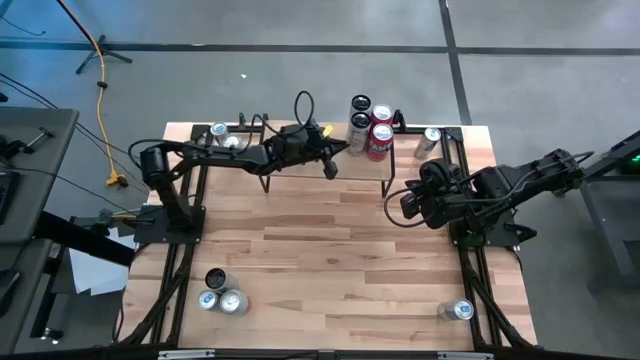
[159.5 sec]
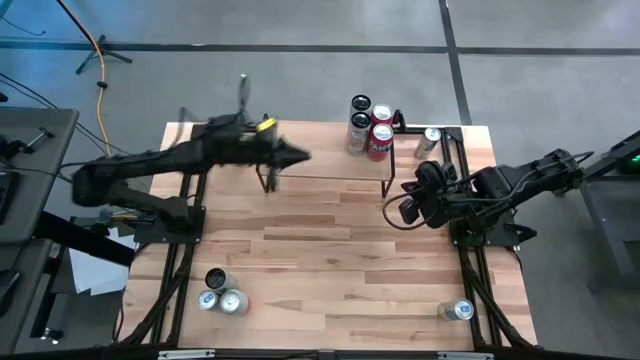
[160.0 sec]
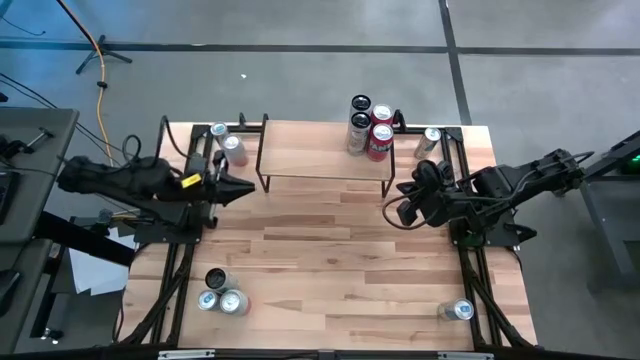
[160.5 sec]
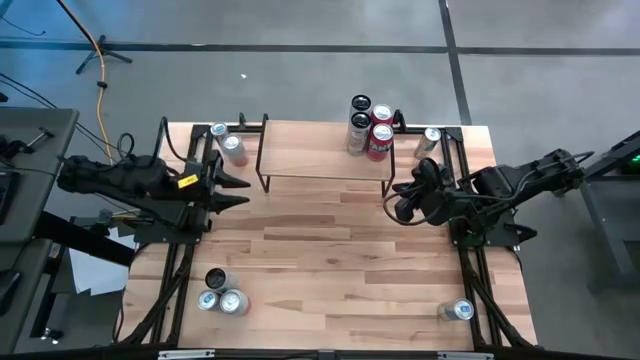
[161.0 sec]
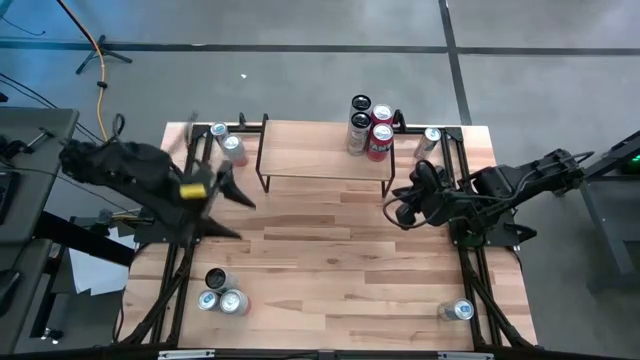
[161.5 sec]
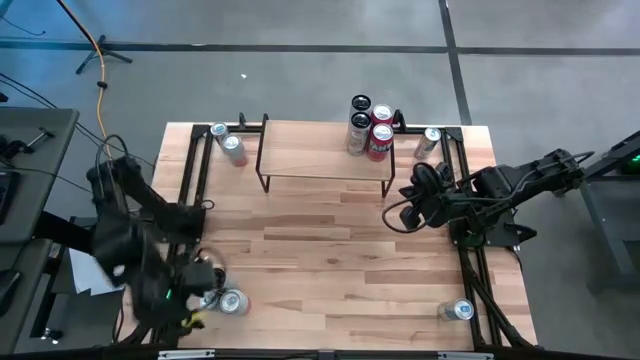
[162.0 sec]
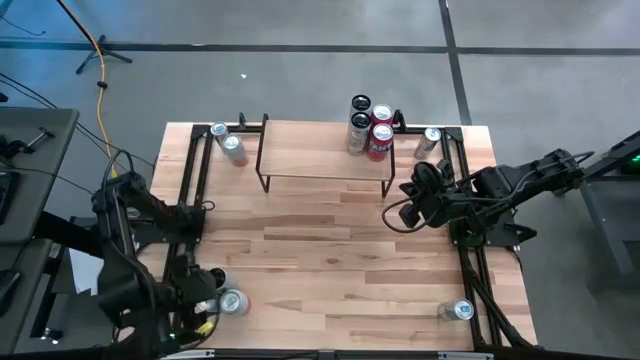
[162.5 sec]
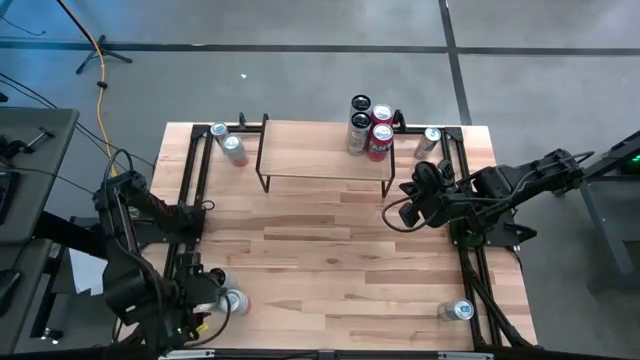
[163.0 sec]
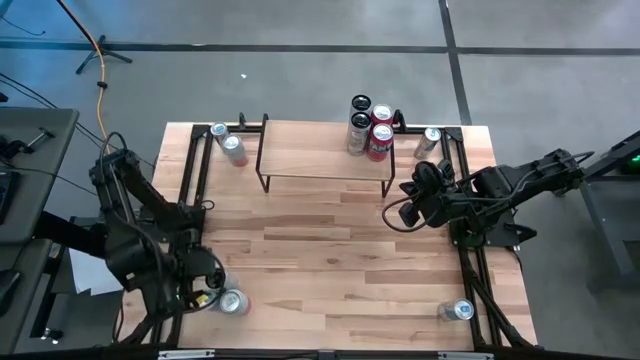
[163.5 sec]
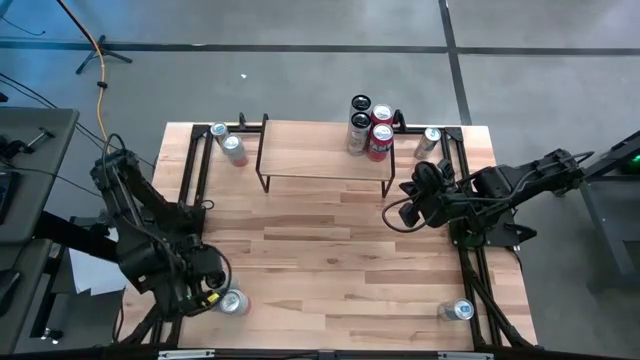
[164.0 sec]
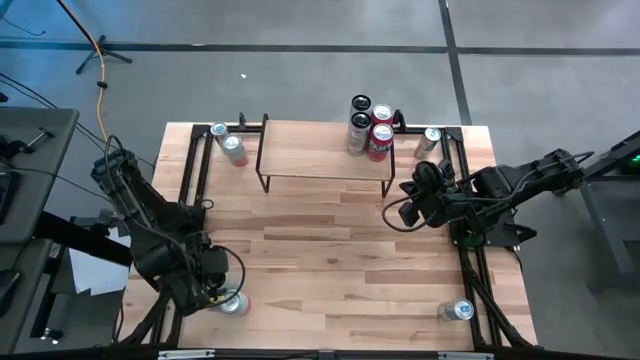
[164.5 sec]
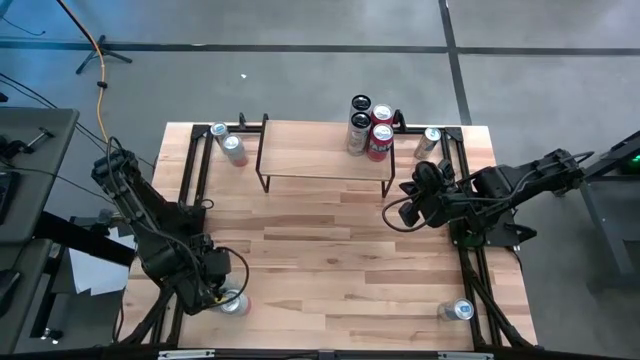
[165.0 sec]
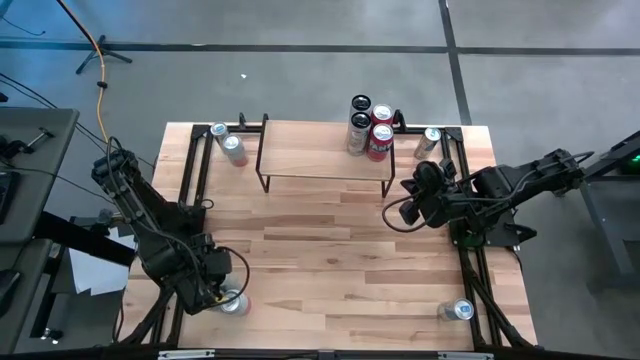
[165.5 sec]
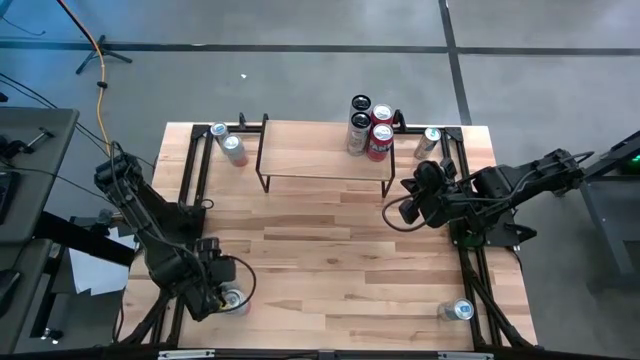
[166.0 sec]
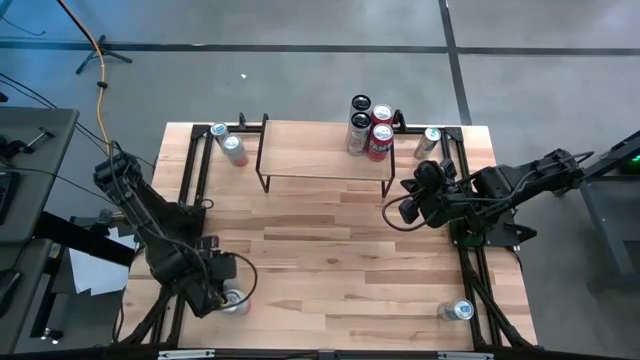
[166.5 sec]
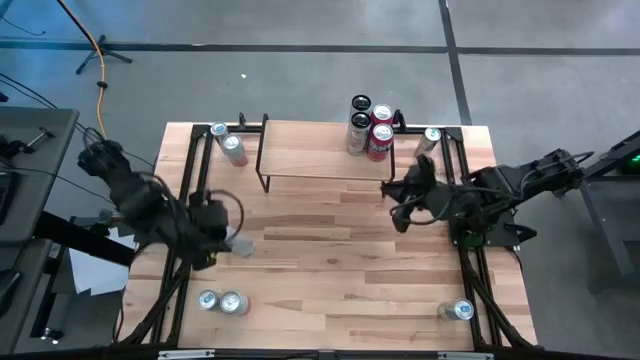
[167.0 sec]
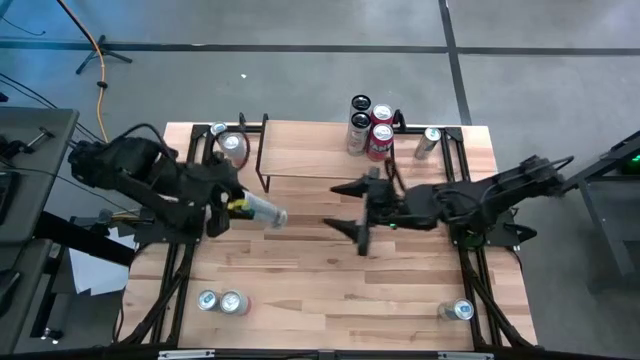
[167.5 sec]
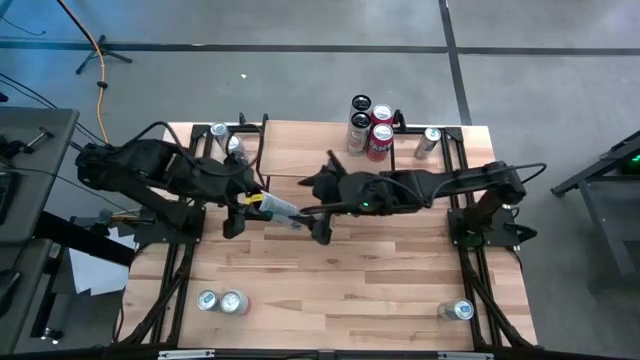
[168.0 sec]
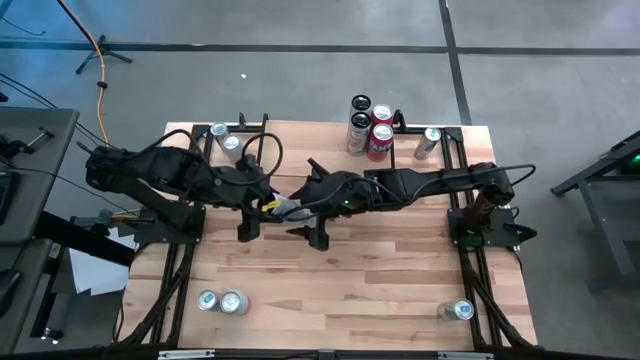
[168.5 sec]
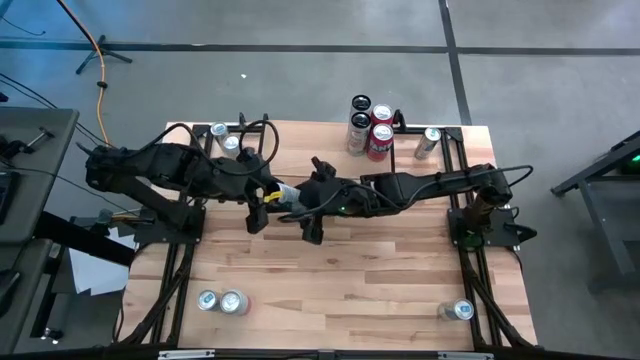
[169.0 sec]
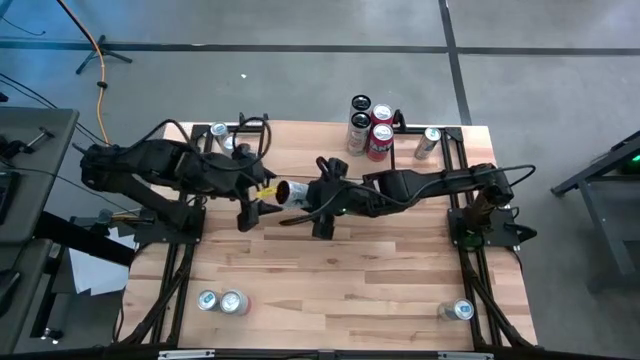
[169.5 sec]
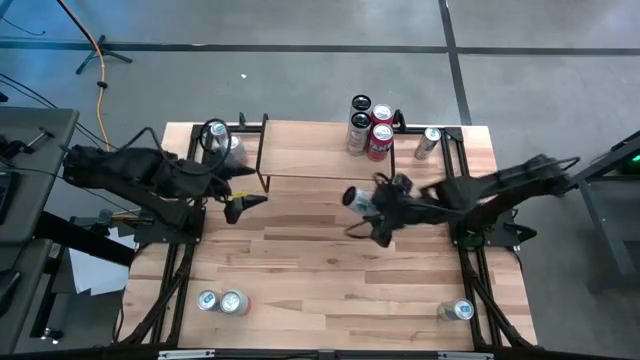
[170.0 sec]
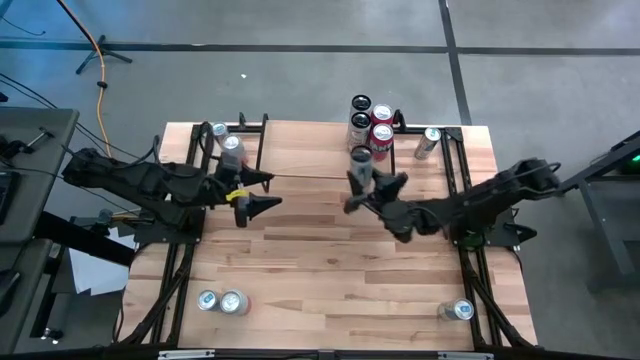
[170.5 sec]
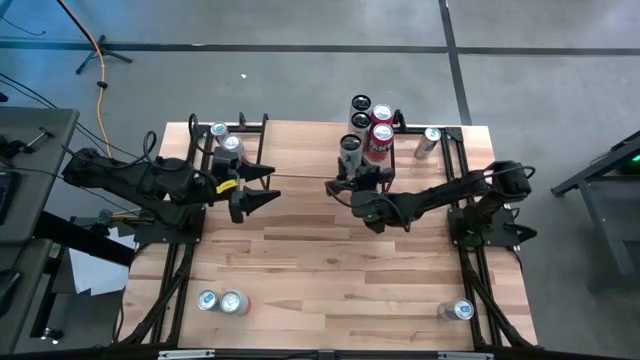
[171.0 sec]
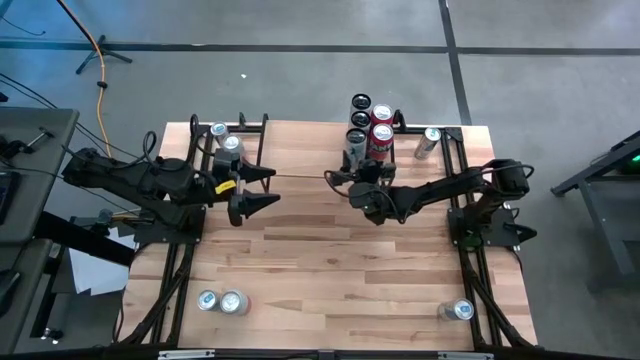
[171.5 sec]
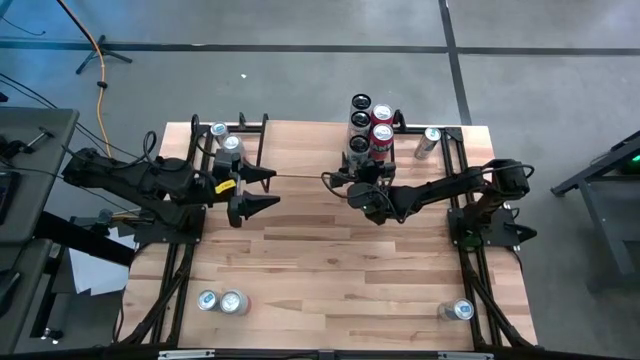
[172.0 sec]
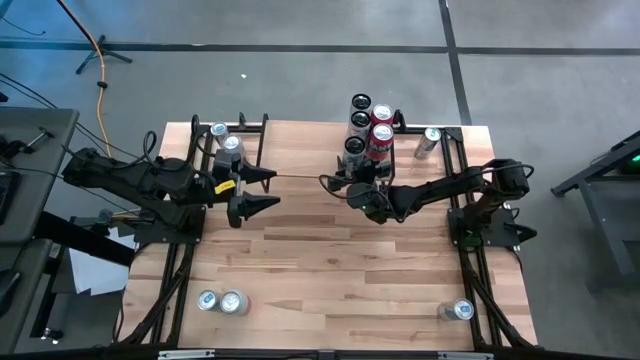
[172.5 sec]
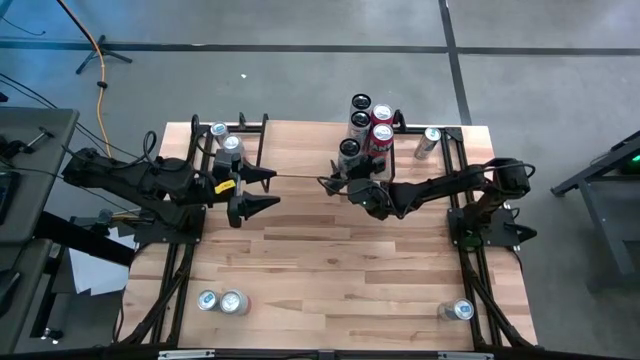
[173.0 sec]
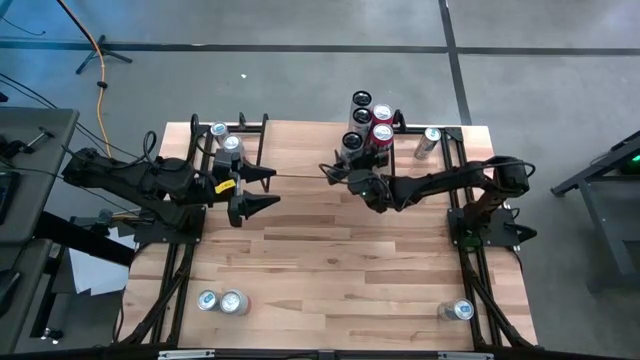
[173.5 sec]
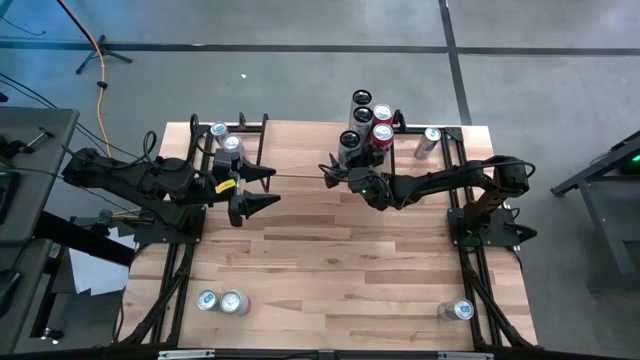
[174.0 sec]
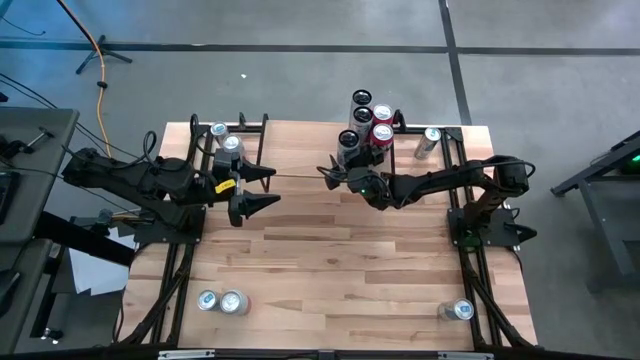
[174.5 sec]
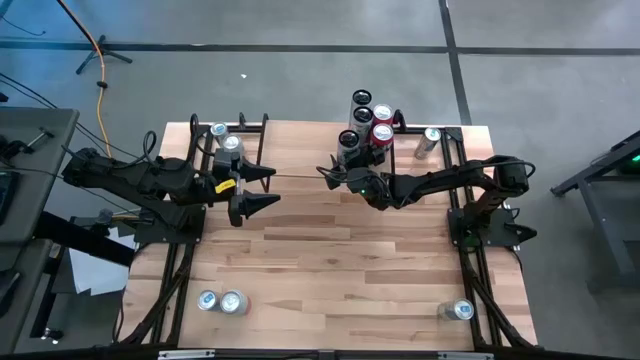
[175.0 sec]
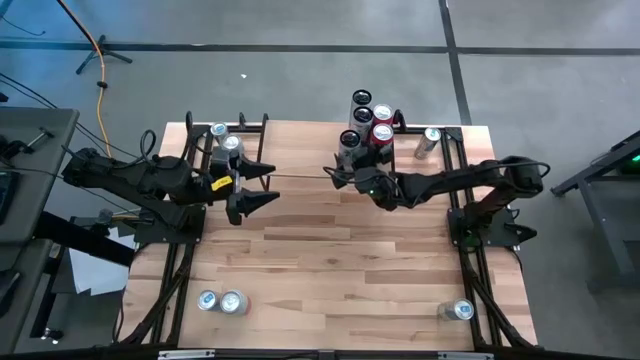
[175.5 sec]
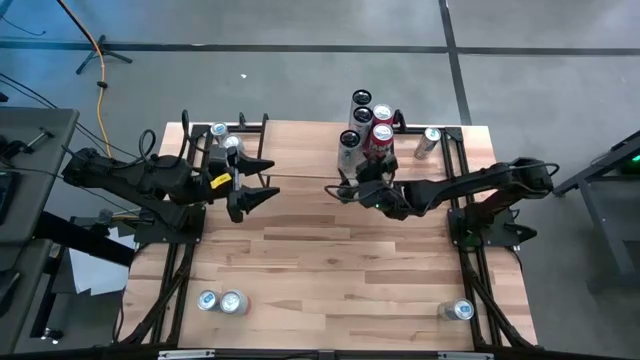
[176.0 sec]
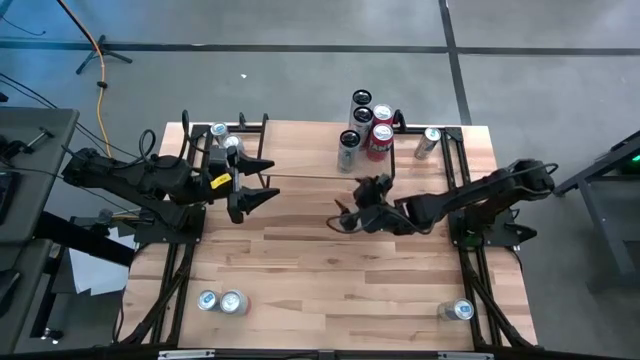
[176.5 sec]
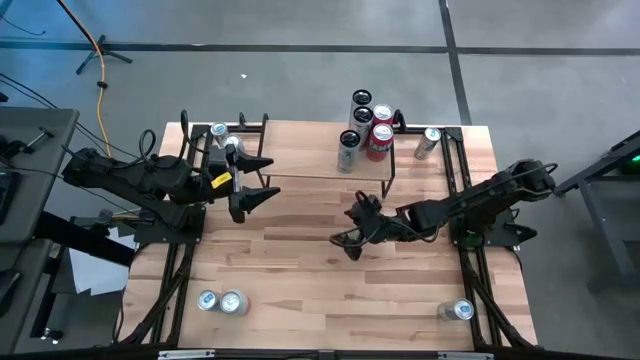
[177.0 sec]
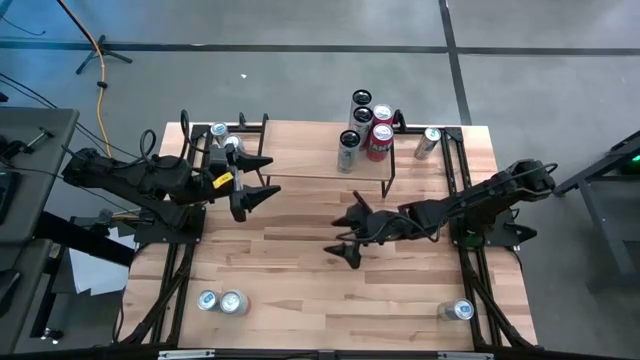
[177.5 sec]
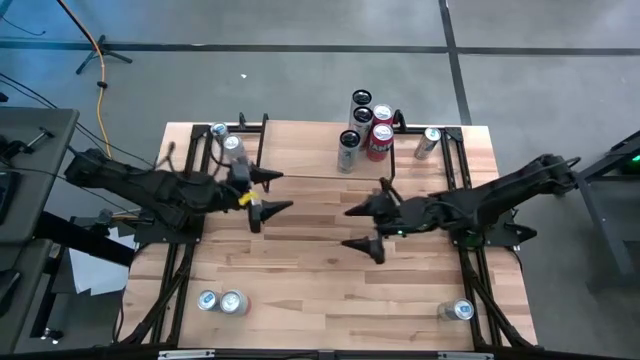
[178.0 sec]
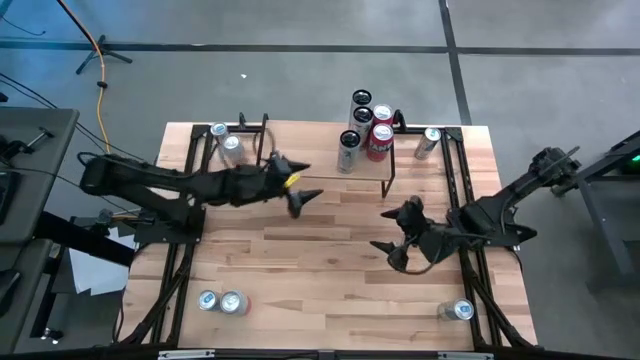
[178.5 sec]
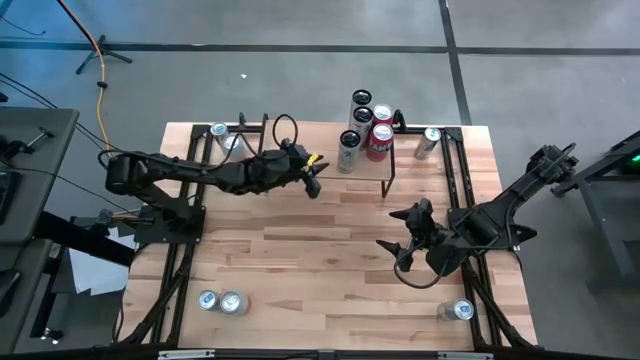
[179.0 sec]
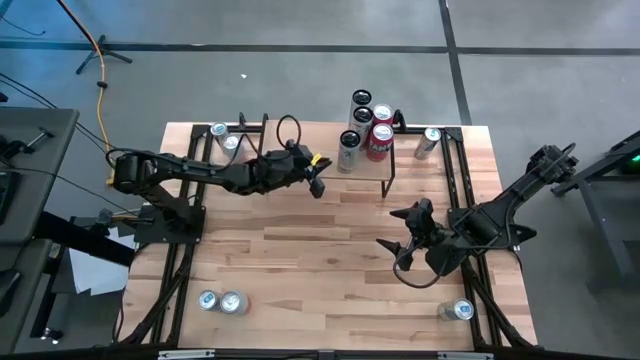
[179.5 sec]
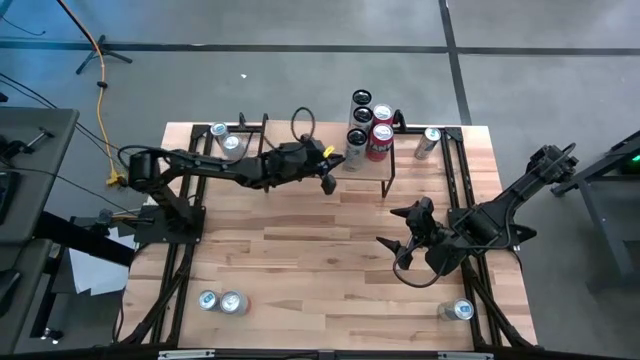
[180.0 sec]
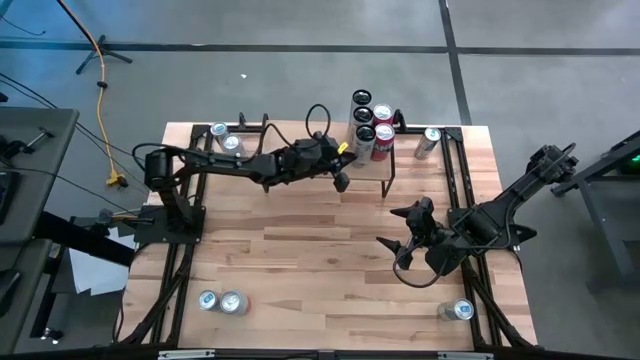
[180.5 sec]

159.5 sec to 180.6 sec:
Task: Place canned beverage on shelf
Put the white-pink soda can on the shelf aligned with the white-pink soda can
